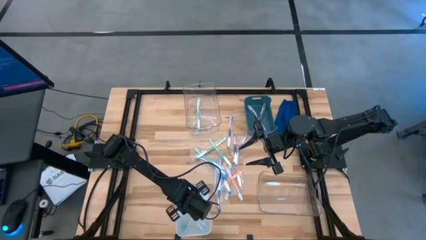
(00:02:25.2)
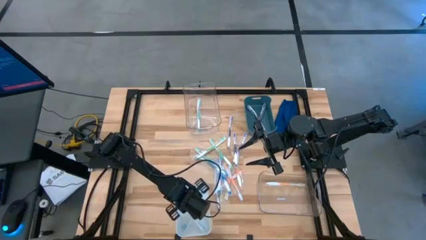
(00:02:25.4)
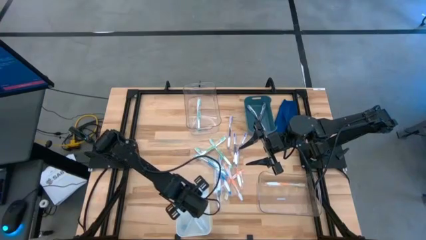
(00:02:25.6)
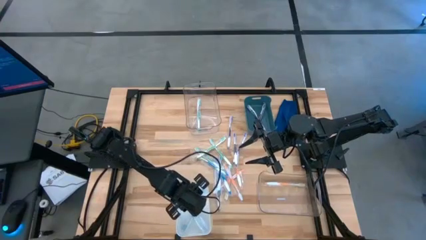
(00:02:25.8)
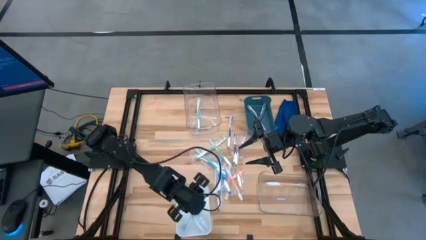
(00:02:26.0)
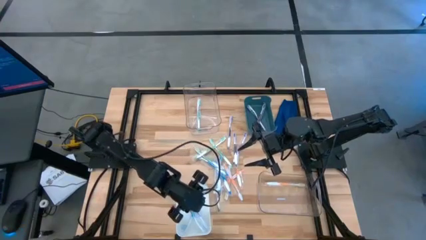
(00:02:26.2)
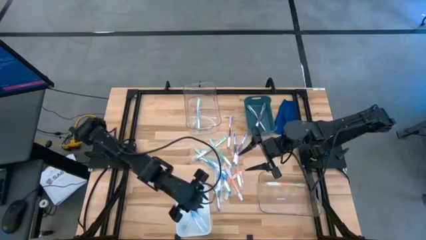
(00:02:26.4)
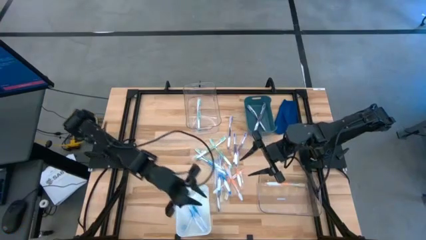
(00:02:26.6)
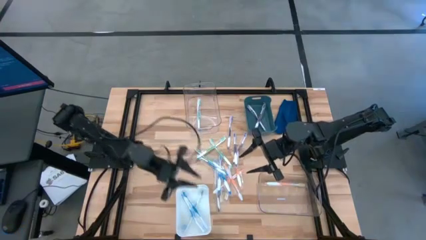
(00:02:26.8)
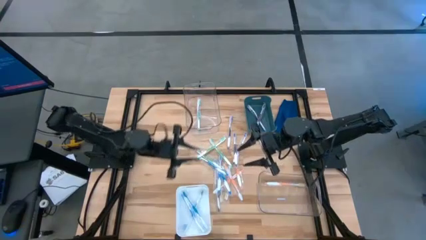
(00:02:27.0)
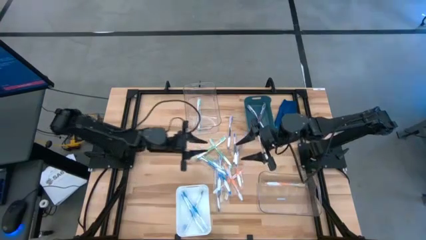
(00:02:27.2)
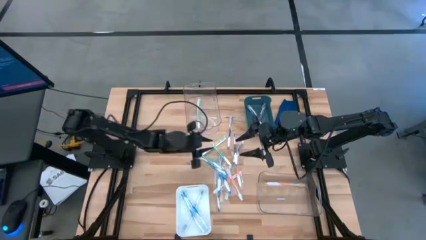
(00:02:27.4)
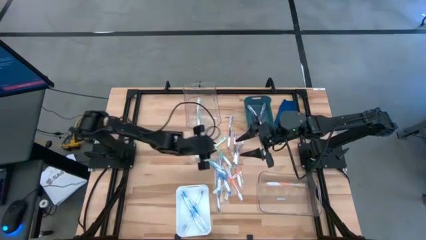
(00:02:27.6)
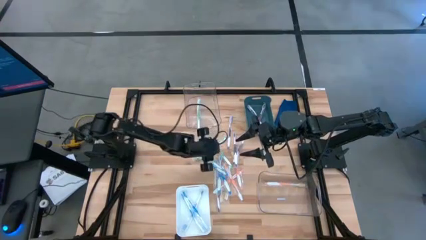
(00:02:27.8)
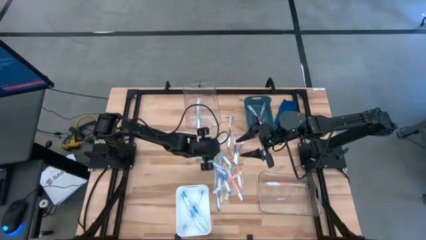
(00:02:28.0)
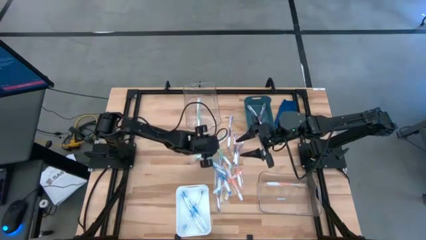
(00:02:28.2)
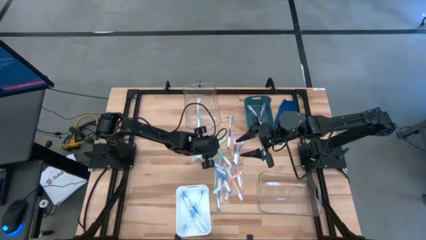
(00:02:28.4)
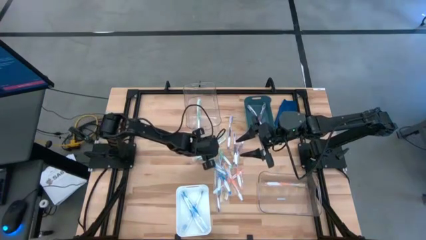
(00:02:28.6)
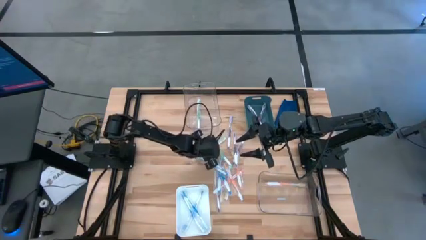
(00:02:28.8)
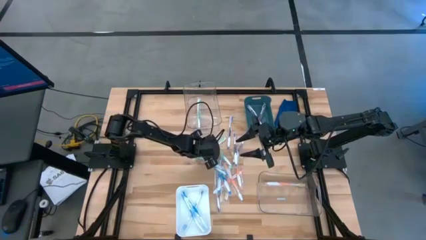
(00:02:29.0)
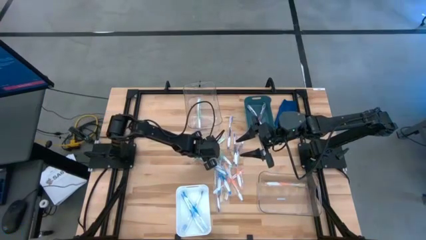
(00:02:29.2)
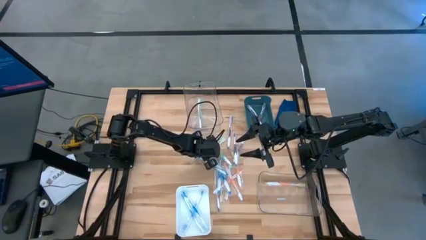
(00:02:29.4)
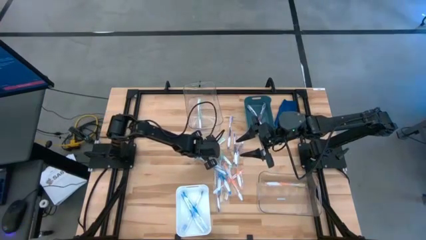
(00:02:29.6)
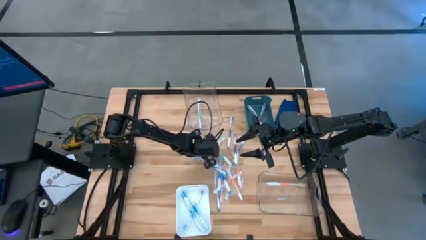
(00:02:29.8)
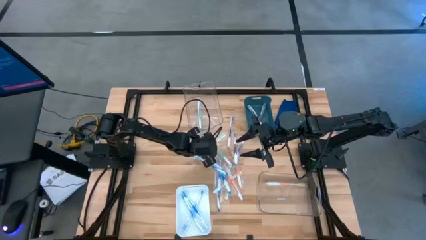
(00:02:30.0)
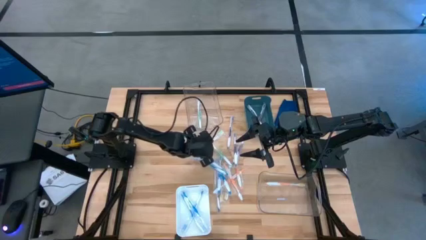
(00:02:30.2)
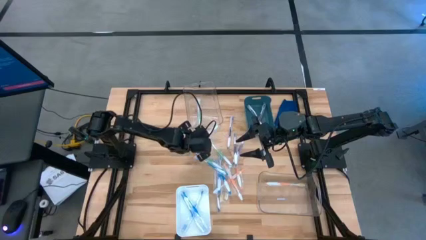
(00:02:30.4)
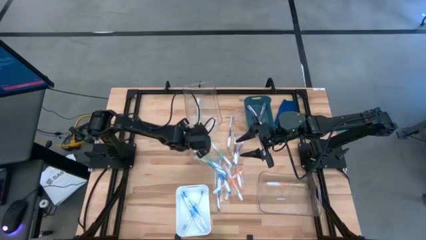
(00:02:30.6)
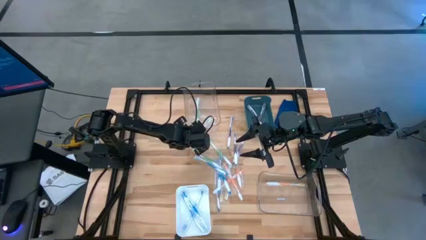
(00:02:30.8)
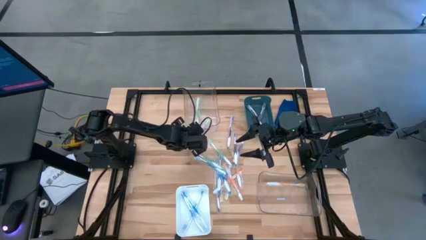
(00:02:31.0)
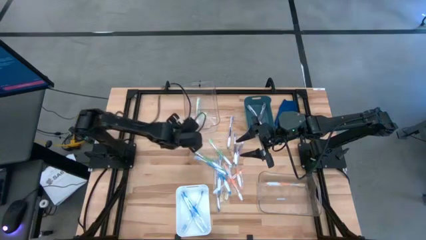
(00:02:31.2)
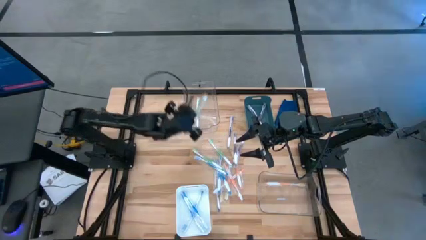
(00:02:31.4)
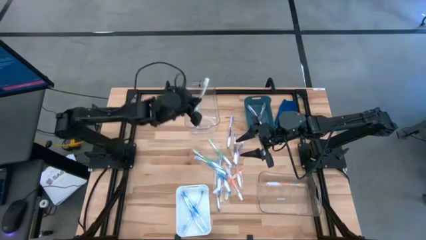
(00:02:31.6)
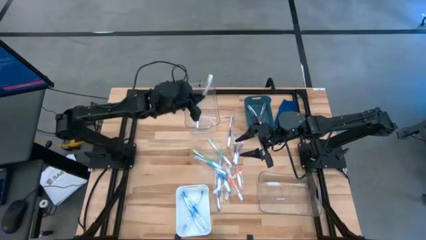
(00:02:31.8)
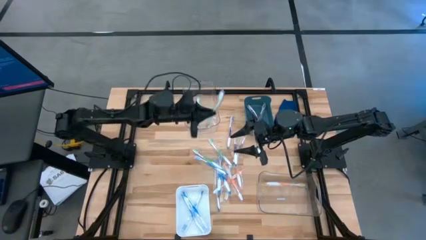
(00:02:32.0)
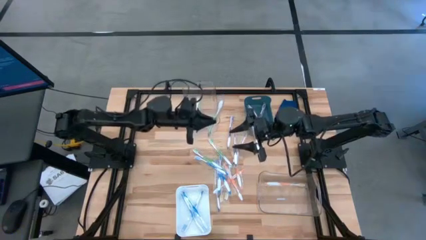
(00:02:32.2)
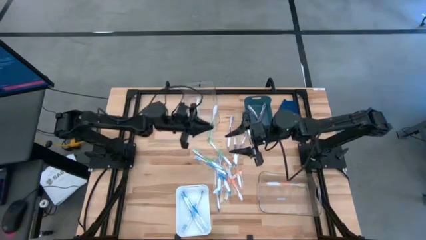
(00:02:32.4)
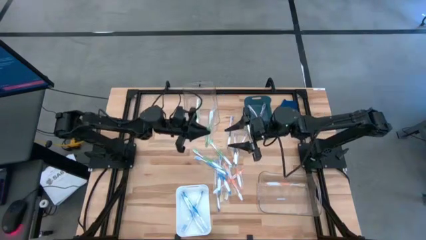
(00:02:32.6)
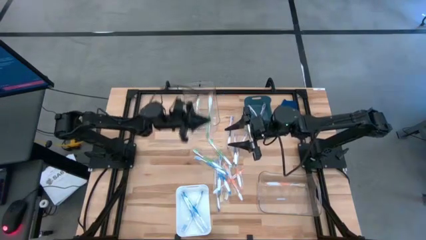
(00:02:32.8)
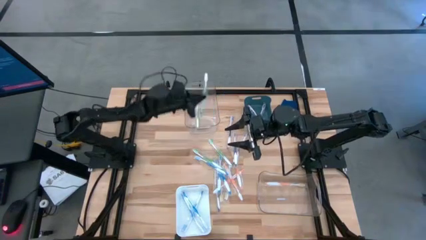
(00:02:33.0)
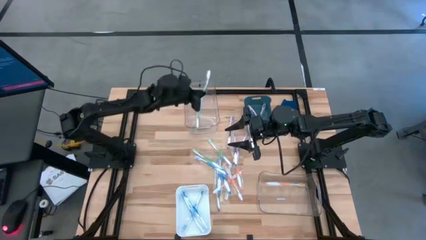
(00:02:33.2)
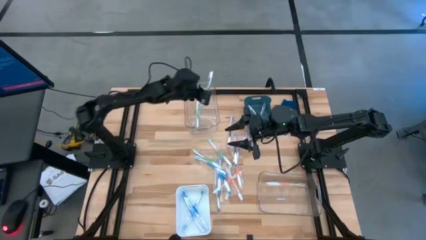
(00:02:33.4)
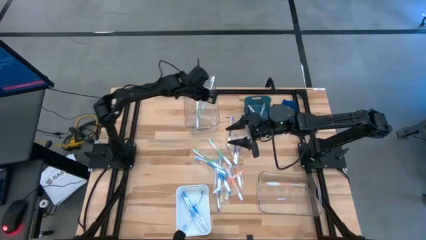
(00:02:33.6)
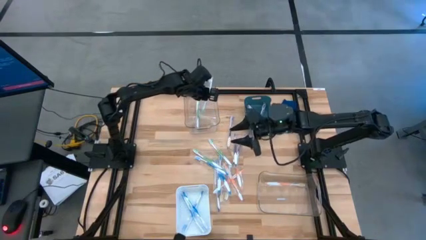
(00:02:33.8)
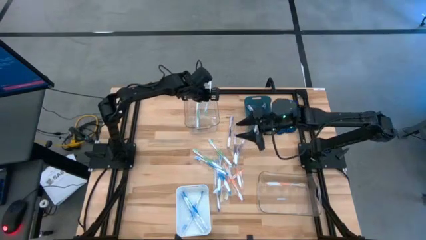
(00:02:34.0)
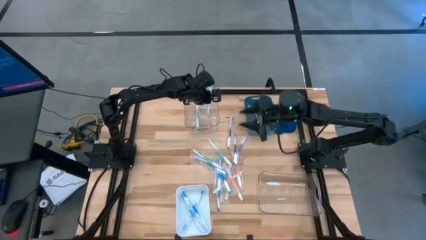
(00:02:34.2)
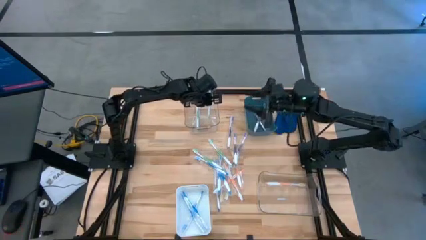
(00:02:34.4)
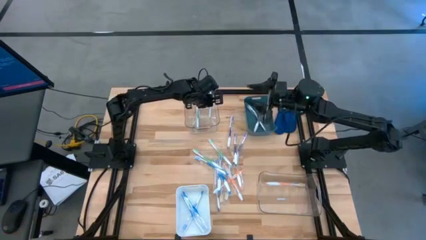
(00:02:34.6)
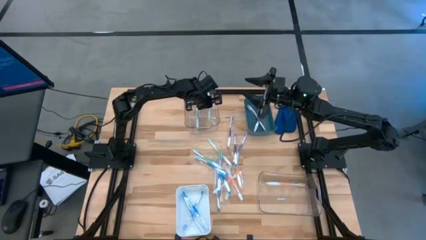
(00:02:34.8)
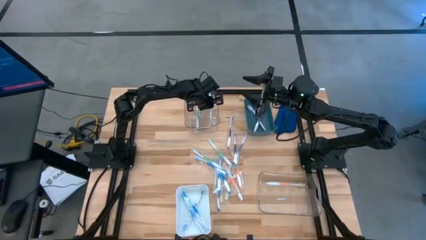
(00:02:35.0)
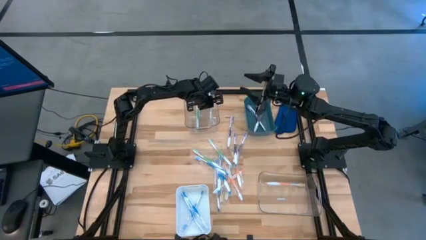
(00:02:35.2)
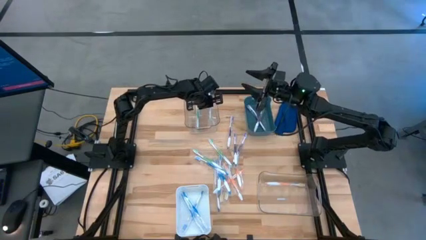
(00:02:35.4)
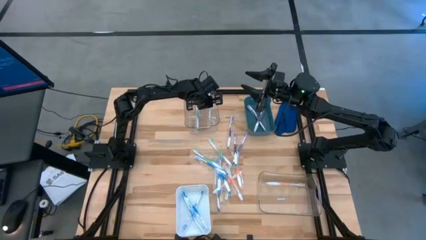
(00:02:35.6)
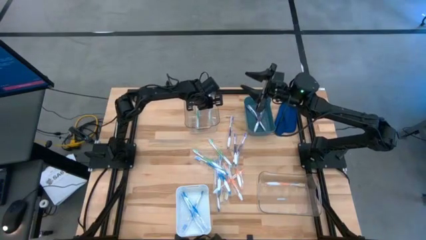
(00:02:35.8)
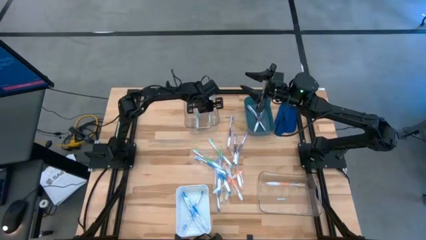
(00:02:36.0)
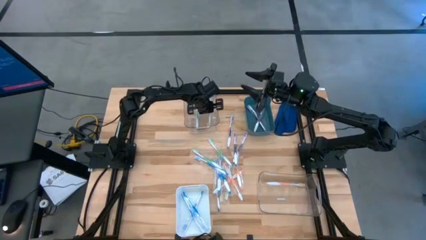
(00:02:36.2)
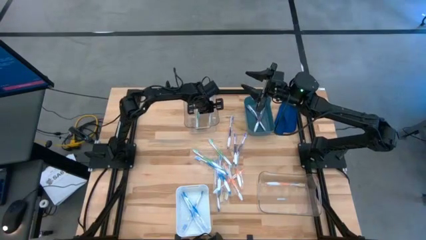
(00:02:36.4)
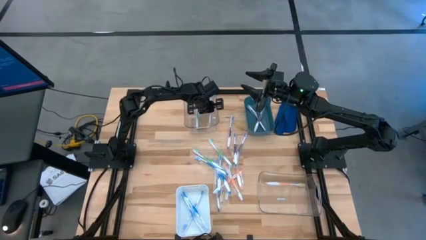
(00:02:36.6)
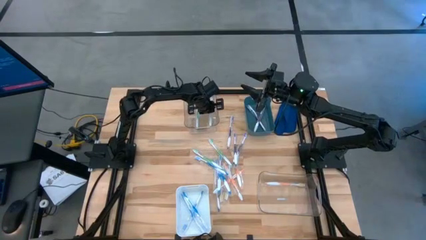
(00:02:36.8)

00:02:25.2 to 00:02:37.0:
Task: Pick & Place Toothbrushes
Put the green toothbrush into the top transparent bin
